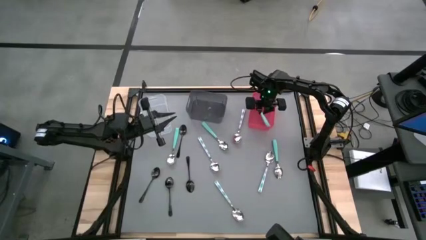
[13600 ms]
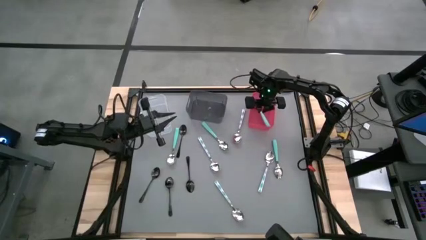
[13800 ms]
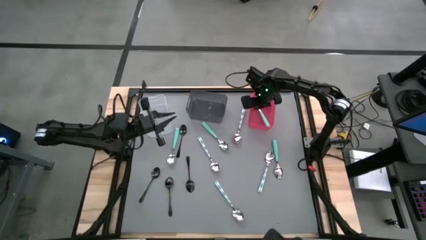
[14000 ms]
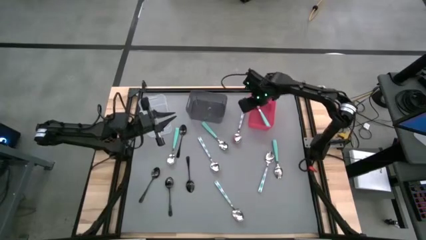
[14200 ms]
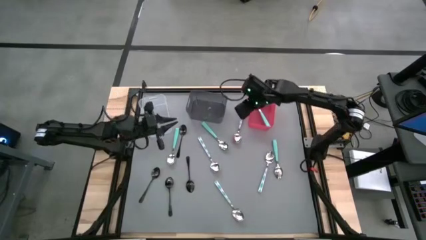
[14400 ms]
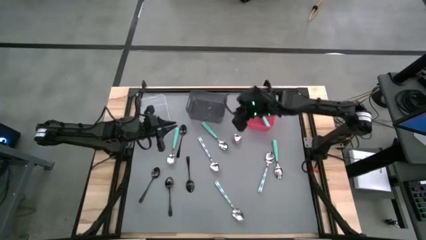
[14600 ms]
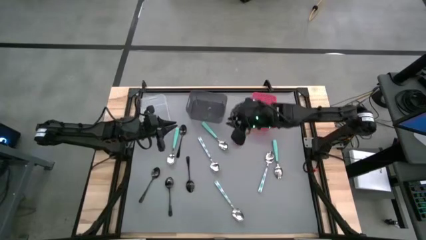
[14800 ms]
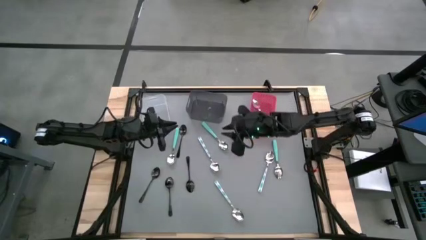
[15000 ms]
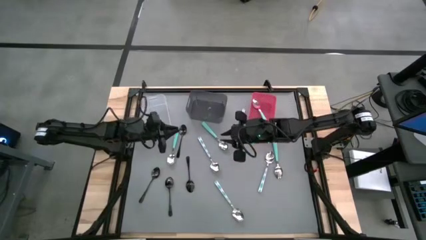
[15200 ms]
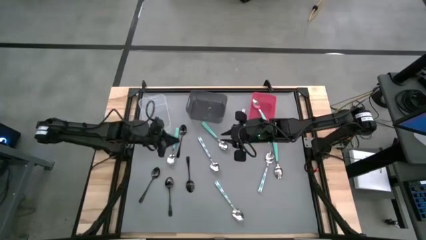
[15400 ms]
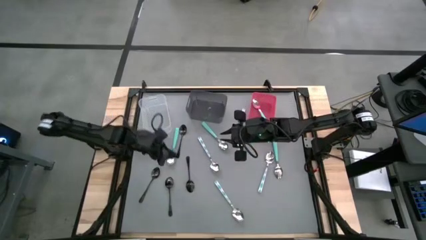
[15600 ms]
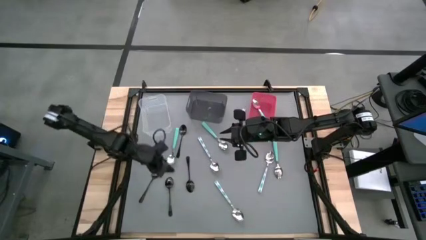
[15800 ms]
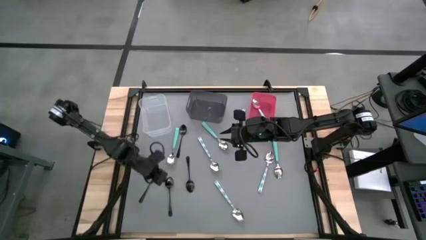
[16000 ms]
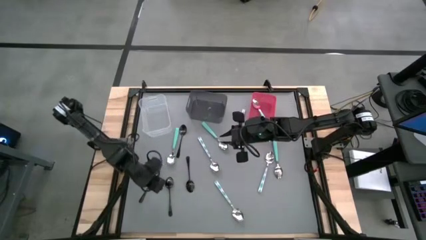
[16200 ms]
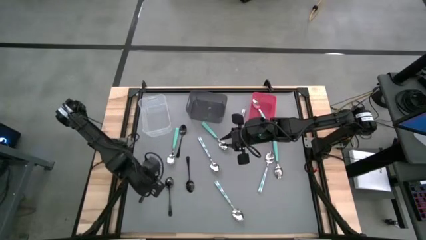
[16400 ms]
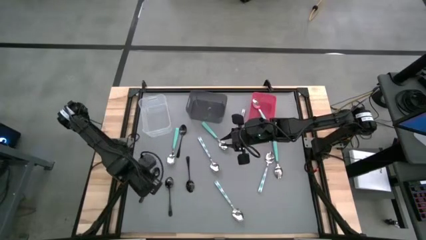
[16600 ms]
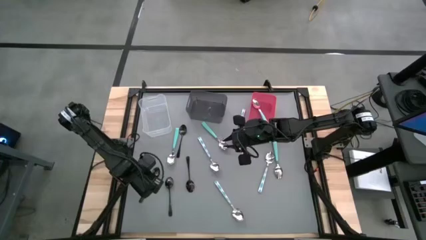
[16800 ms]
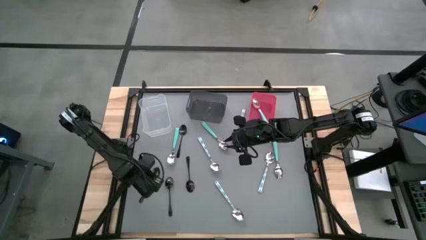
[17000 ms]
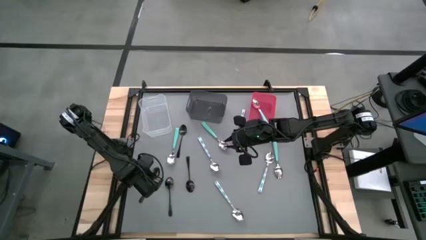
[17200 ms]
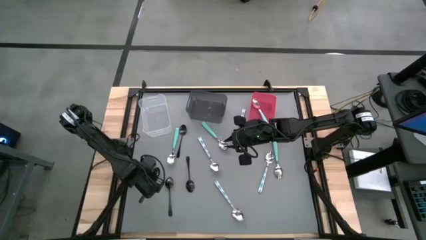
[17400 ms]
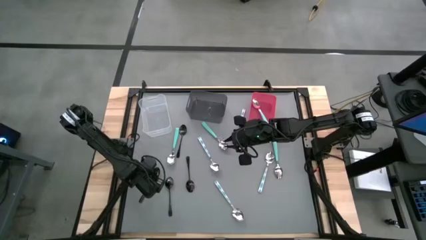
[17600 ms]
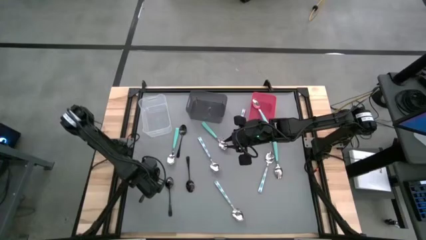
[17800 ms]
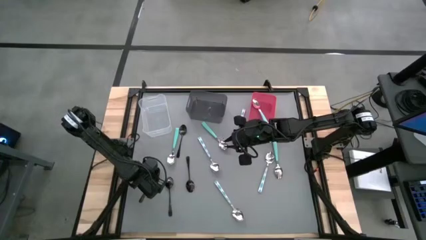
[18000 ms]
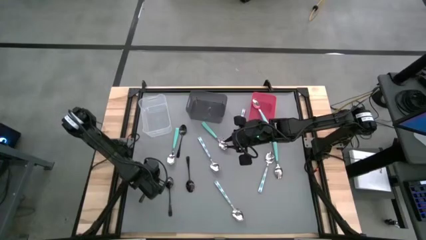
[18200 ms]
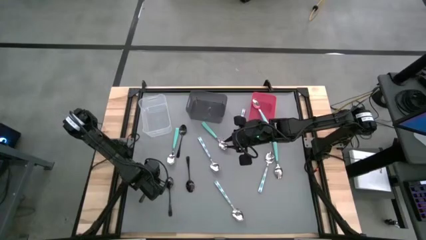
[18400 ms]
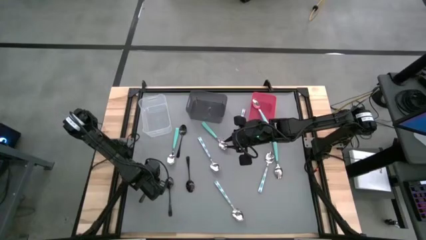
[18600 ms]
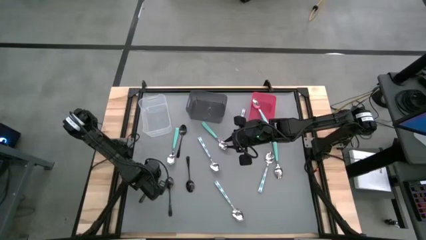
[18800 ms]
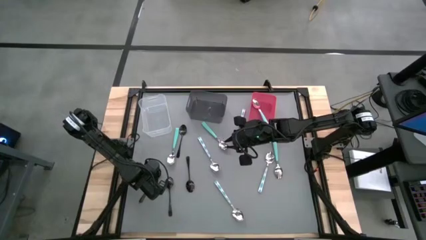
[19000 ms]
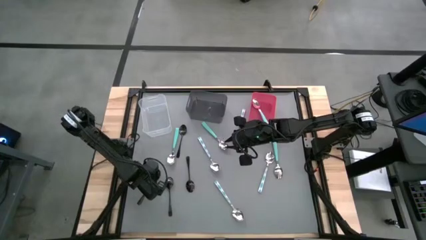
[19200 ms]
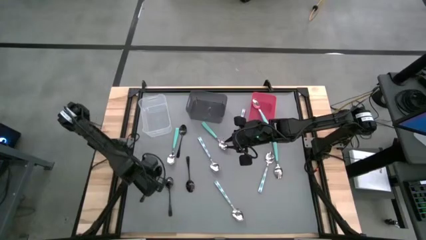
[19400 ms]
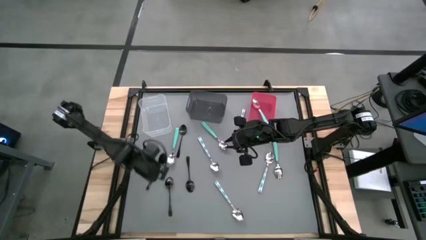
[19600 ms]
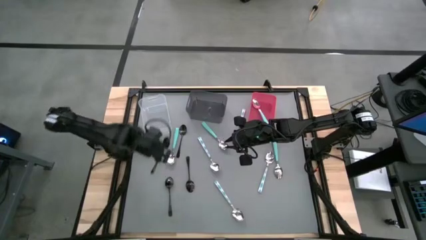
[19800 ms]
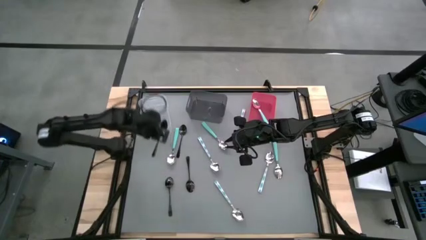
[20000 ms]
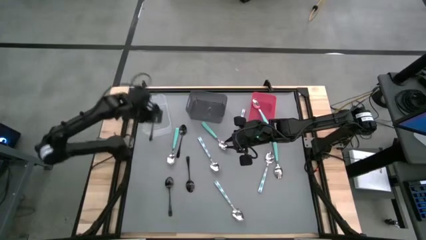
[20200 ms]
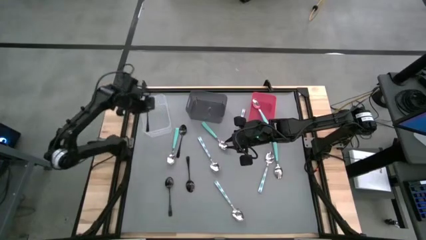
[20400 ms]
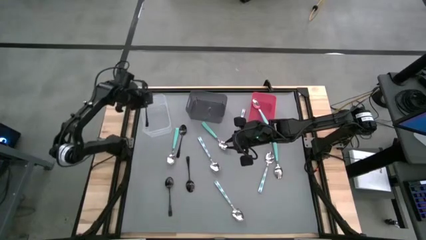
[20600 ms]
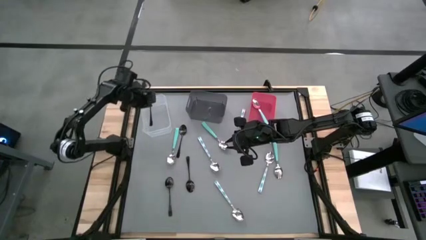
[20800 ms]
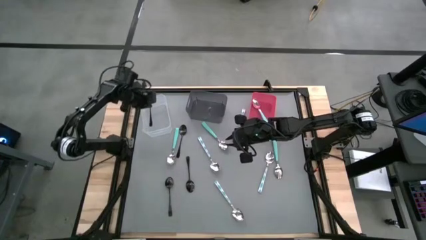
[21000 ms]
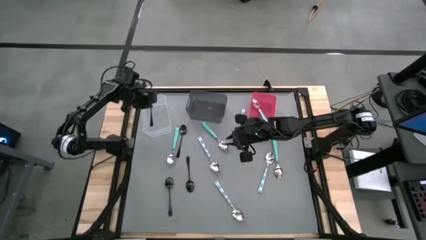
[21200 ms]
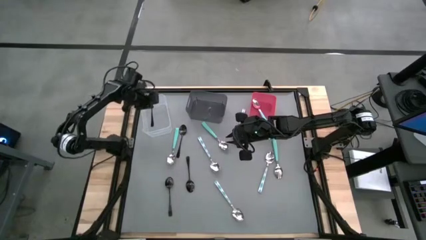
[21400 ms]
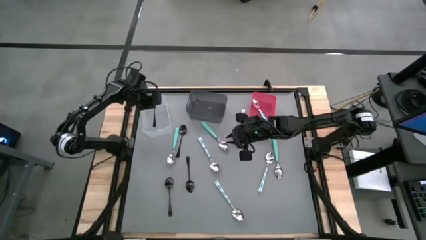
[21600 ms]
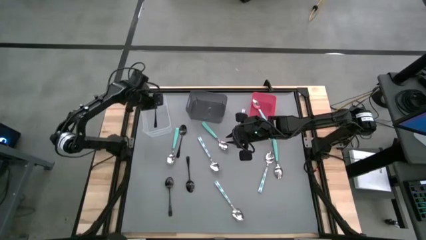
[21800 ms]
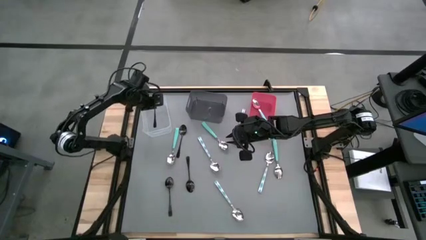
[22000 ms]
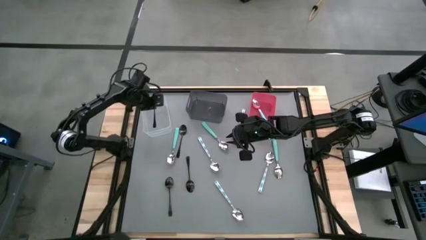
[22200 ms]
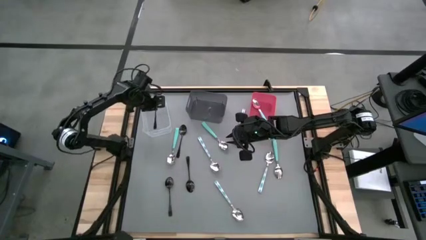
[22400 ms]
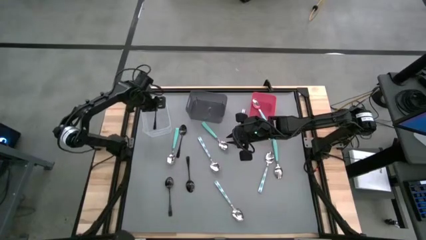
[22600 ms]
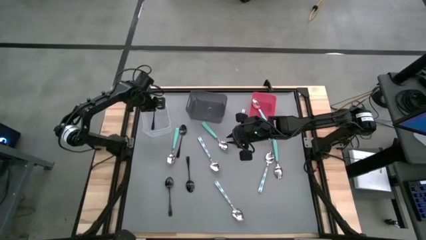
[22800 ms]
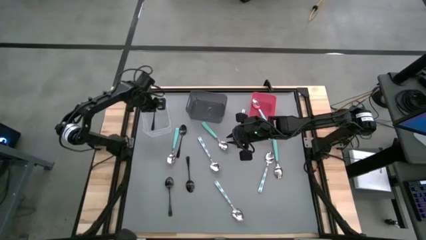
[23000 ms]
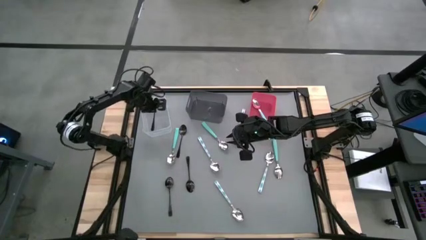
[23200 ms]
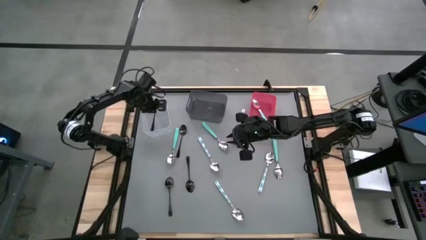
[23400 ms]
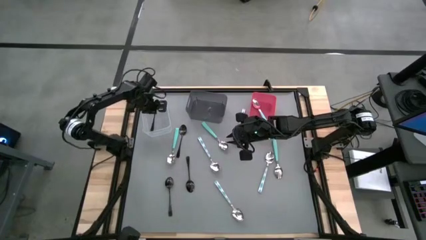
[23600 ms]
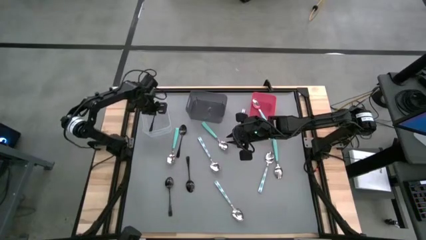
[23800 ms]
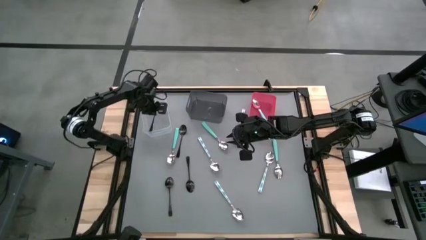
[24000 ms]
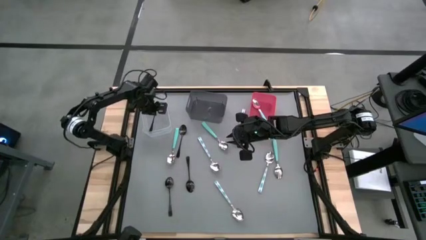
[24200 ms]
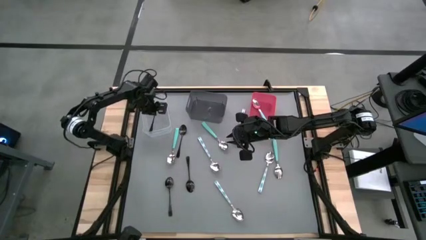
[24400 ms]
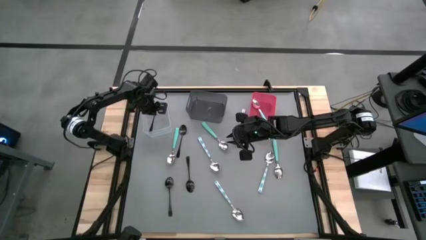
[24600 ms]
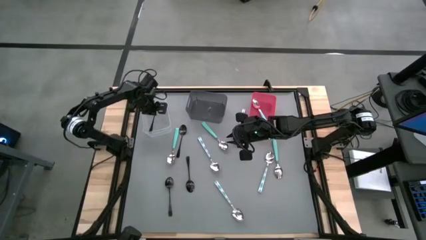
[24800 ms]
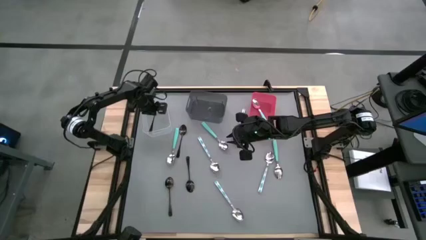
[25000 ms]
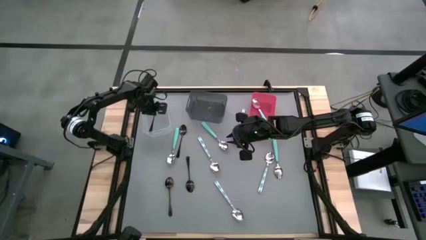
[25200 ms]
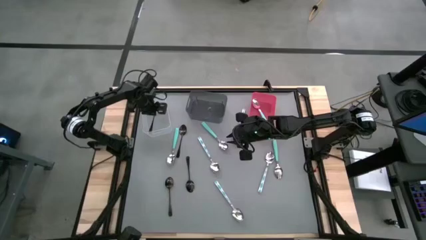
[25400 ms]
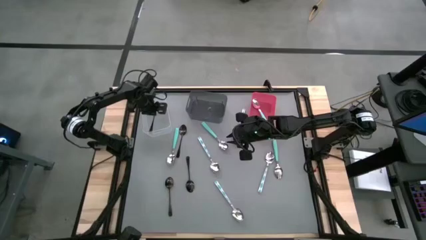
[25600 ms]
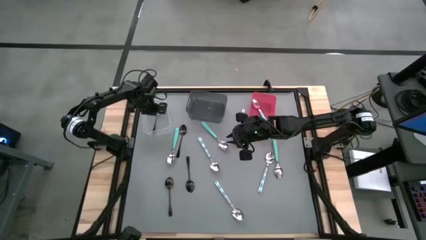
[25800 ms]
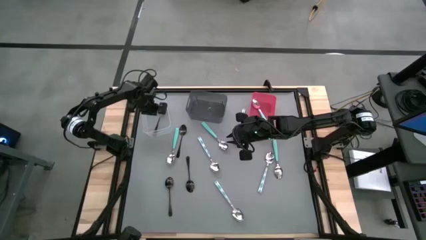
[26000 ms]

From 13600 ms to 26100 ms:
Task: Sort silverware by color (type)
Put the middle left black spoon into the transparent bin

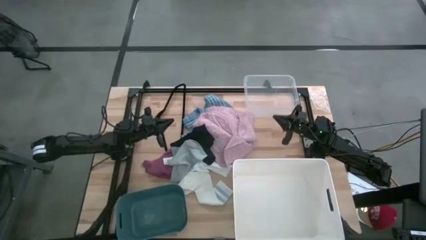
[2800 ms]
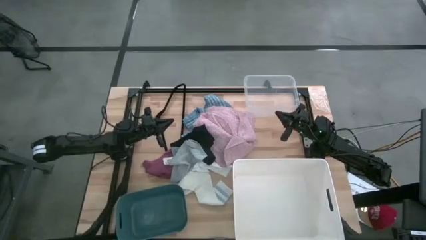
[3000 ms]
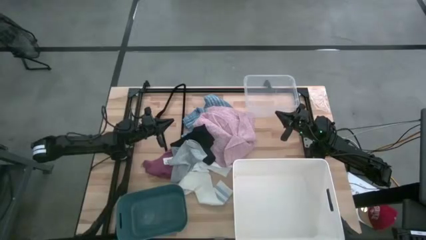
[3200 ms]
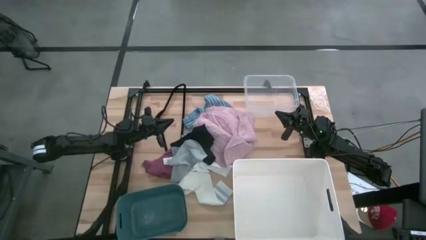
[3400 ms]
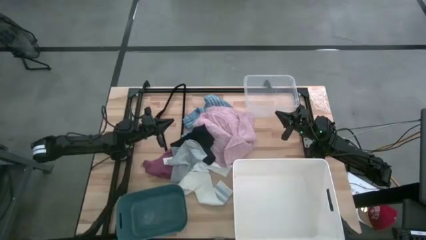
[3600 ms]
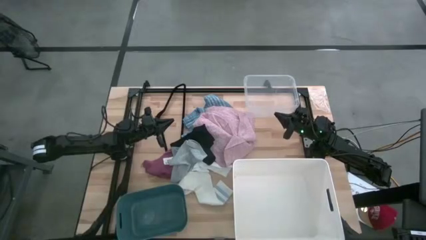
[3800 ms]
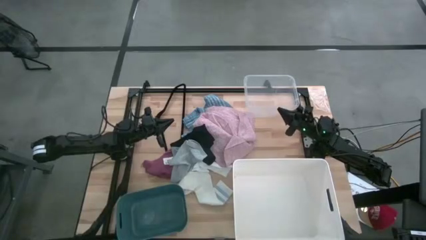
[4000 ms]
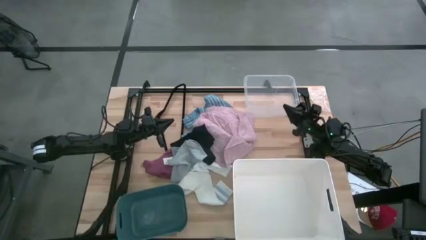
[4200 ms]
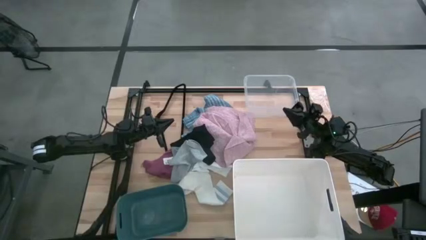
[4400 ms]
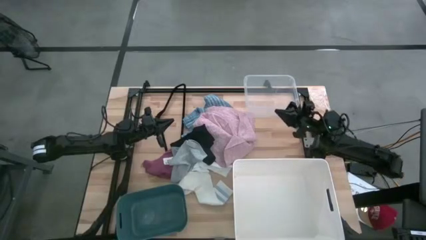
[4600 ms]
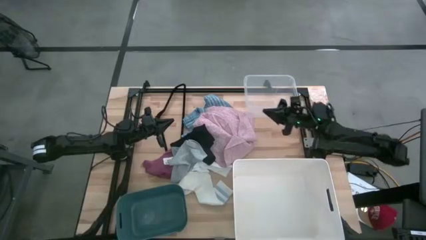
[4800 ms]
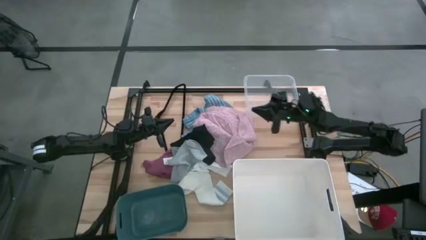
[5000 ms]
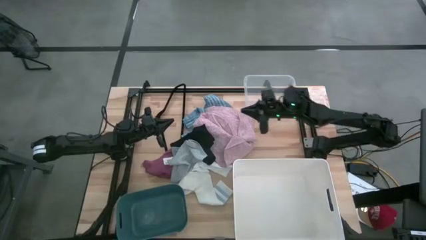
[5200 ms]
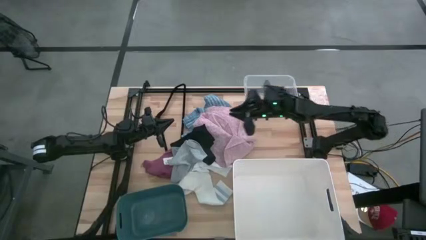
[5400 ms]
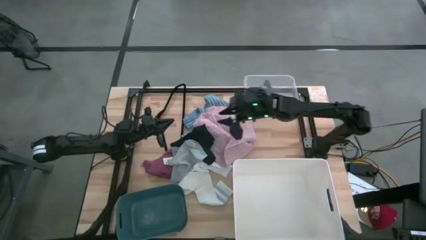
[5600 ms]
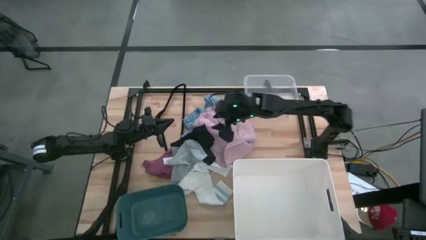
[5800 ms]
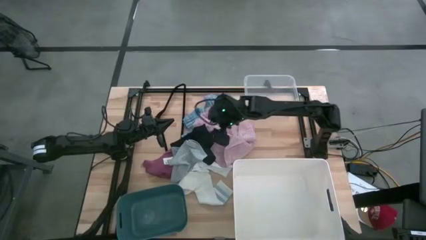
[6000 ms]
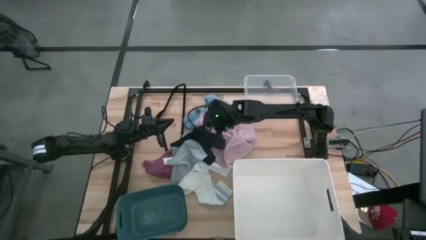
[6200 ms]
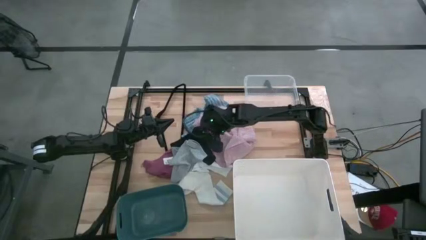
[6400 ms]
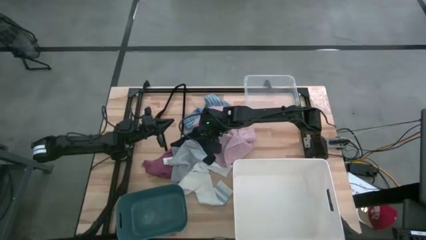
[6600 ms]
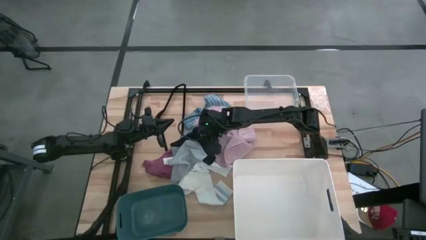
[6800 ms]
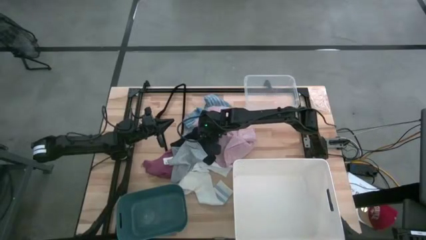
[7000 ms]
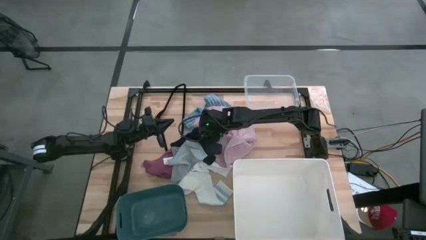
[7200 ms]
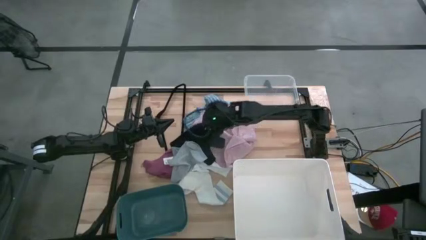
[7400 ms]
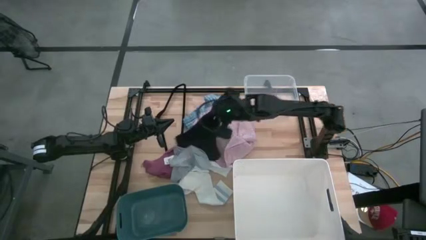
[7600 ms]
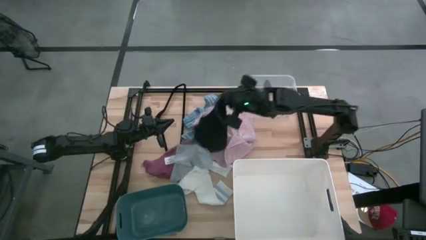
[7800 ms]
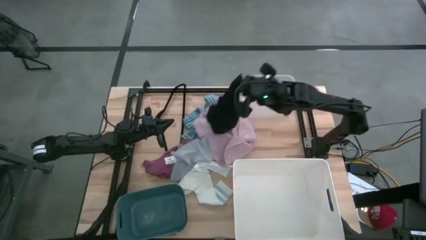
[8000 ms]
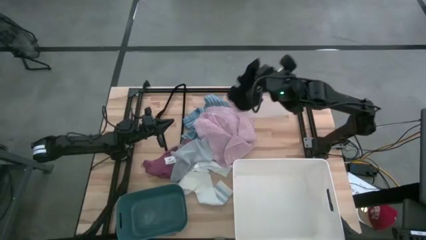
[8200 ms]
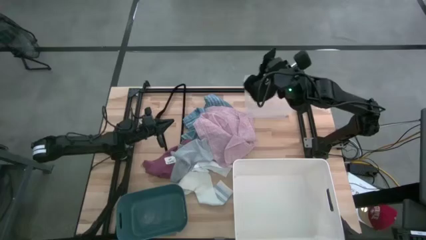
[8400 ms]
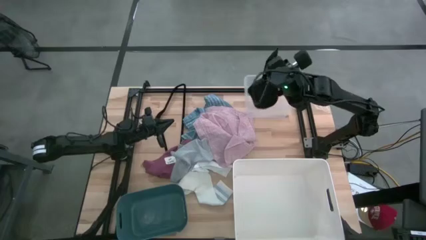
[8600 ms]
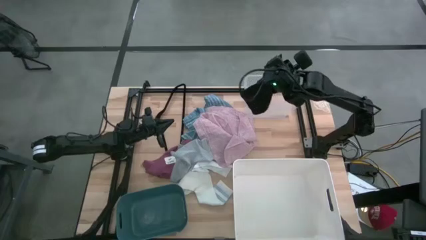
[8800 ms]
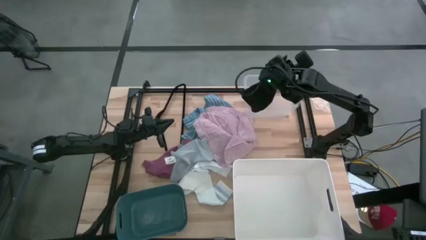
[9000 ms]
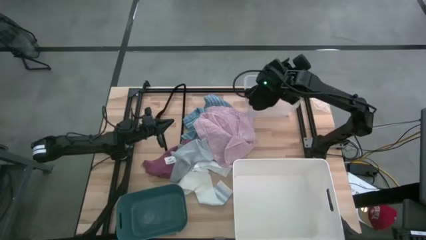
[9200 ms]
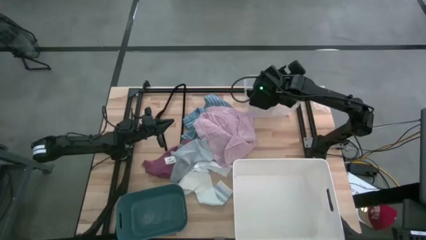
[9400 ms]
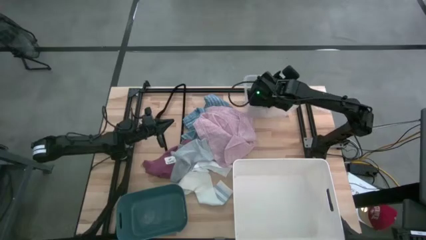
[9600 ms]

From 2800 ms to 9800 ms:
Task: Pick & Place Cloths
Put the black boxer into the transparent bin
